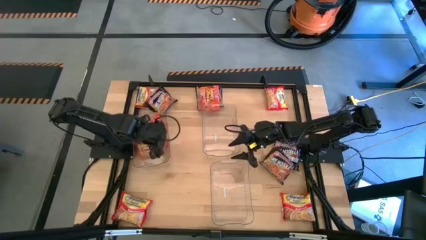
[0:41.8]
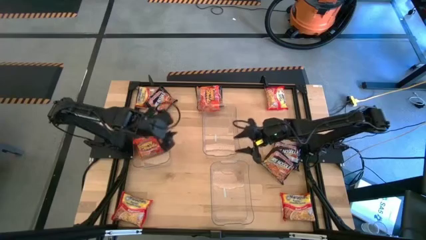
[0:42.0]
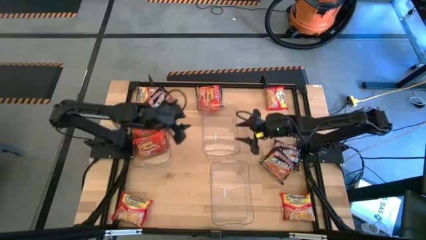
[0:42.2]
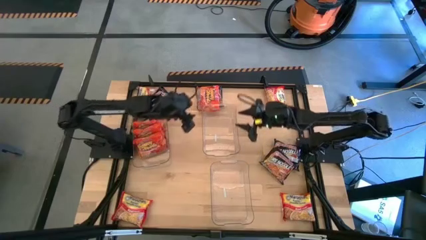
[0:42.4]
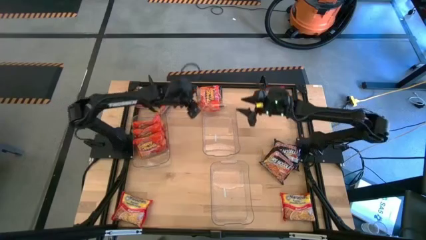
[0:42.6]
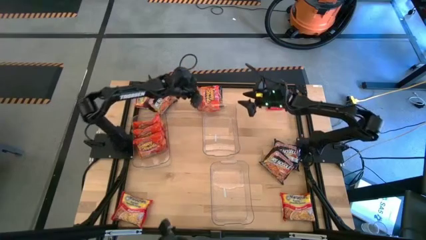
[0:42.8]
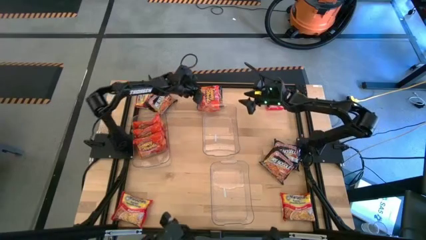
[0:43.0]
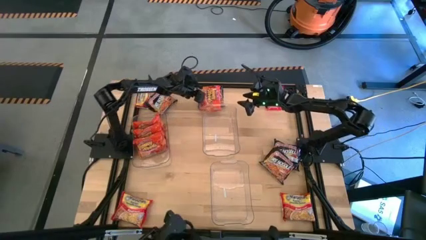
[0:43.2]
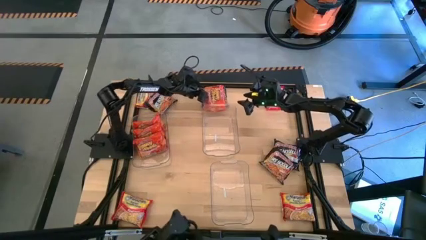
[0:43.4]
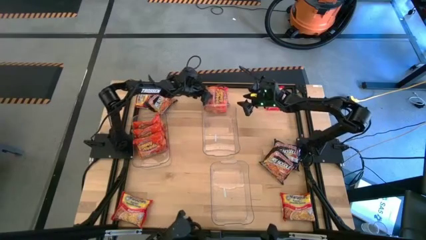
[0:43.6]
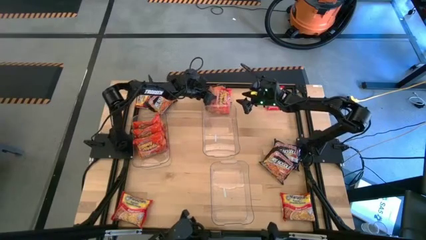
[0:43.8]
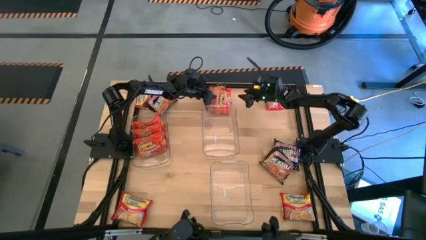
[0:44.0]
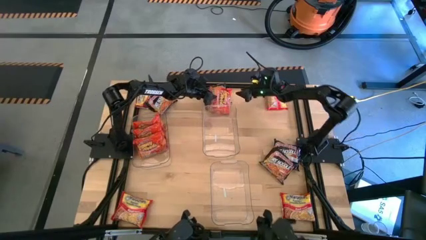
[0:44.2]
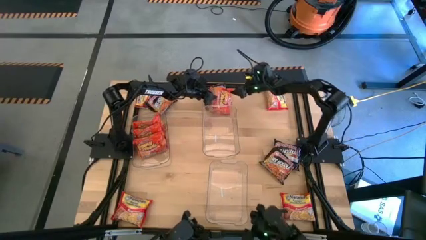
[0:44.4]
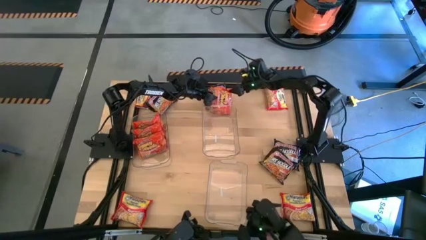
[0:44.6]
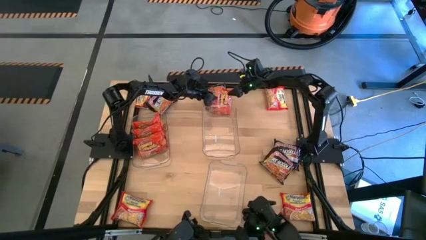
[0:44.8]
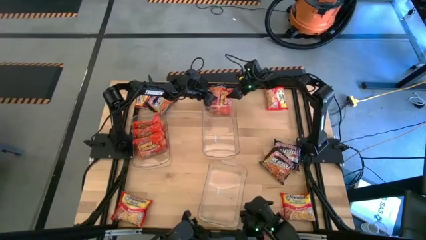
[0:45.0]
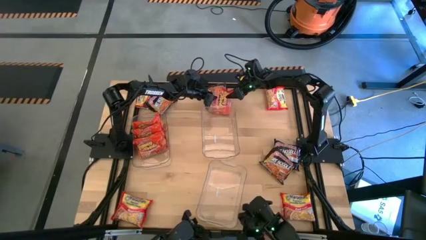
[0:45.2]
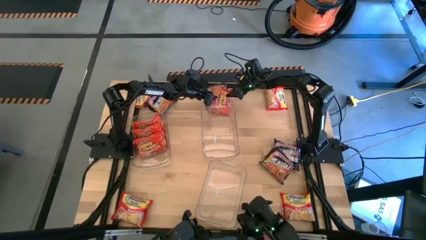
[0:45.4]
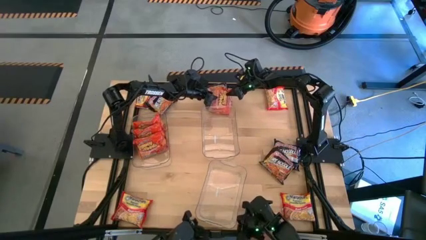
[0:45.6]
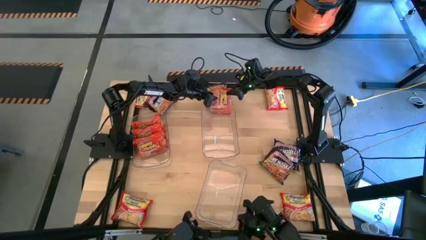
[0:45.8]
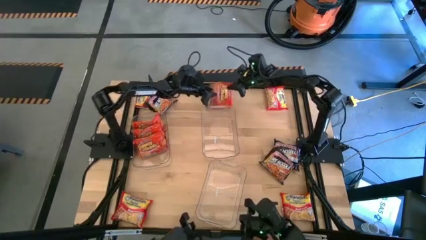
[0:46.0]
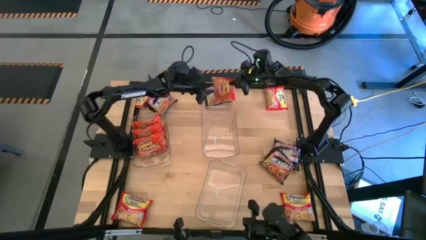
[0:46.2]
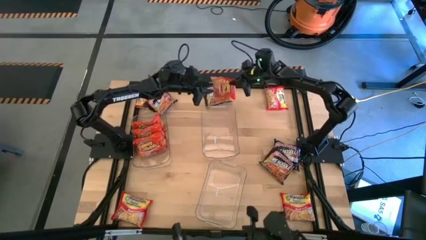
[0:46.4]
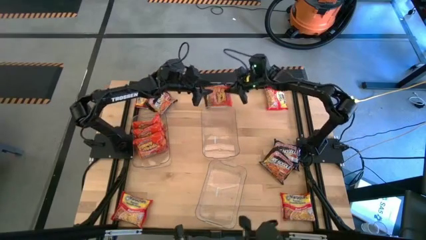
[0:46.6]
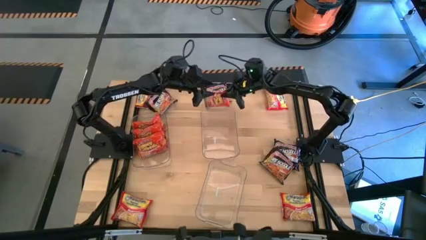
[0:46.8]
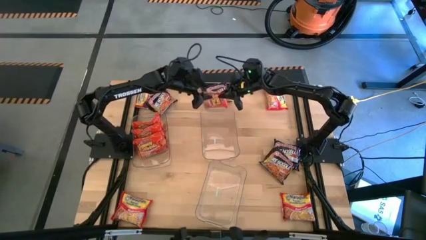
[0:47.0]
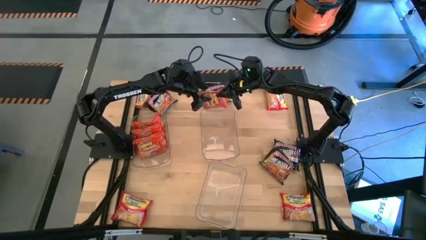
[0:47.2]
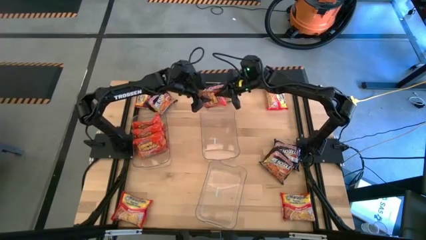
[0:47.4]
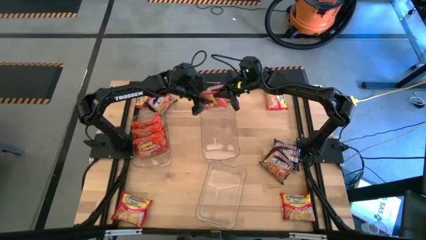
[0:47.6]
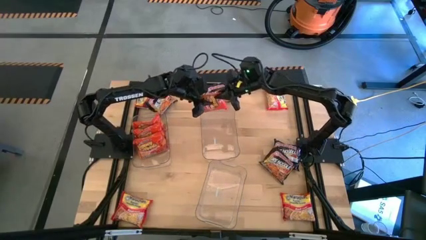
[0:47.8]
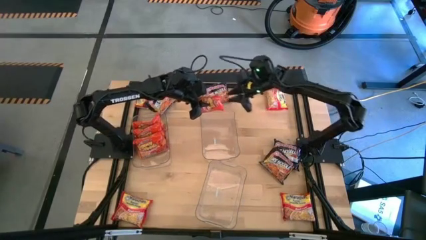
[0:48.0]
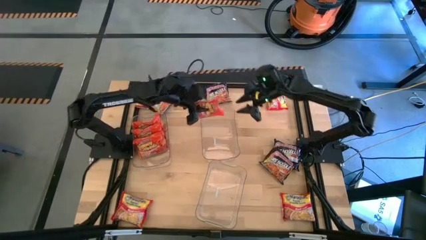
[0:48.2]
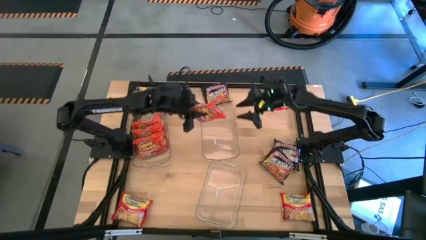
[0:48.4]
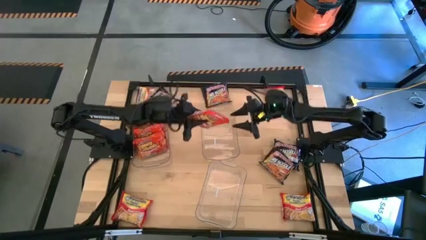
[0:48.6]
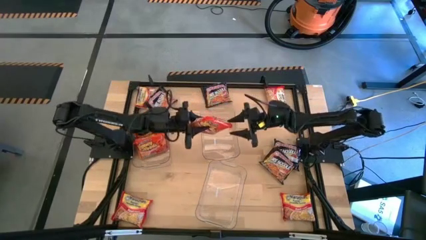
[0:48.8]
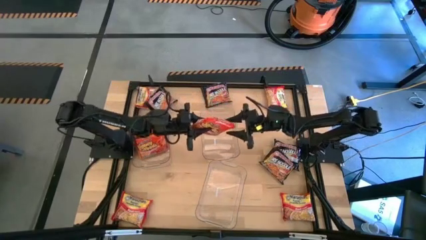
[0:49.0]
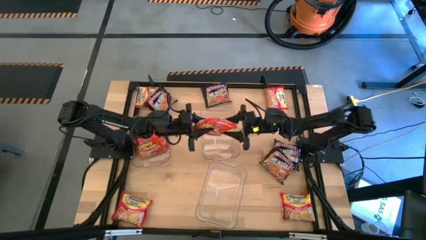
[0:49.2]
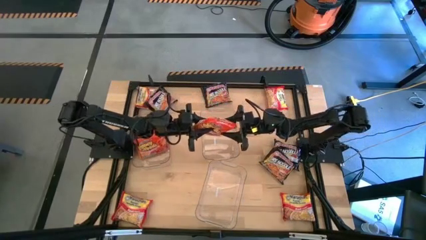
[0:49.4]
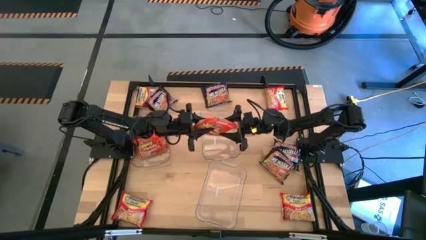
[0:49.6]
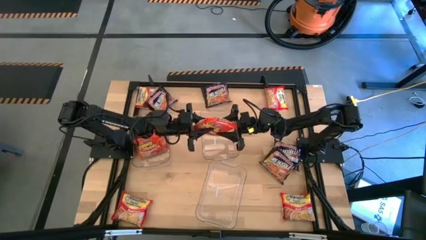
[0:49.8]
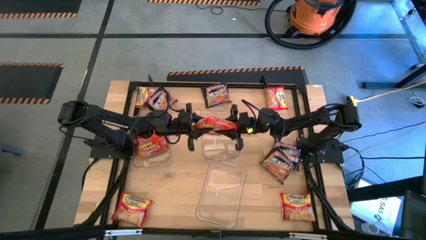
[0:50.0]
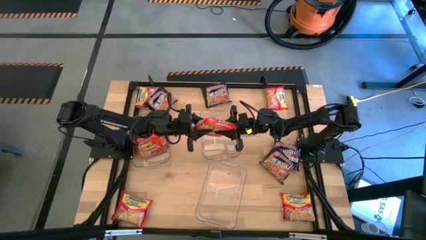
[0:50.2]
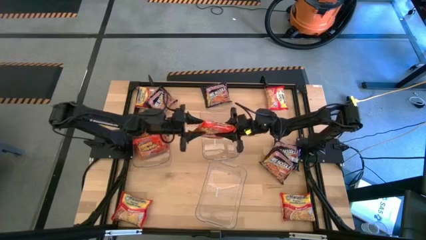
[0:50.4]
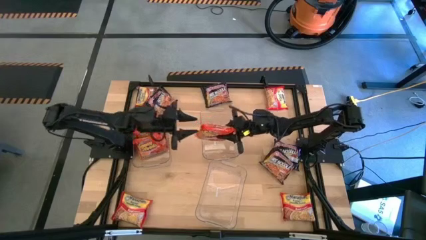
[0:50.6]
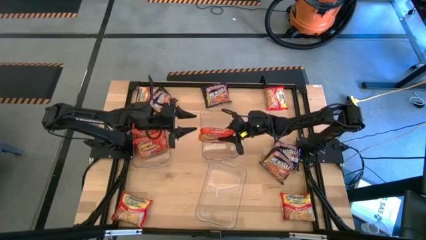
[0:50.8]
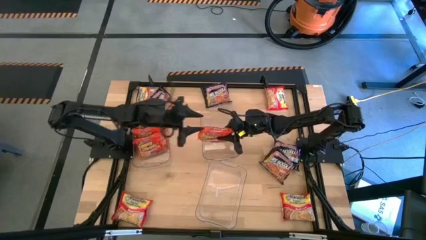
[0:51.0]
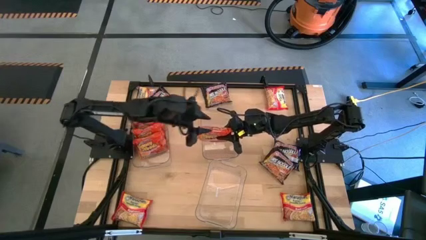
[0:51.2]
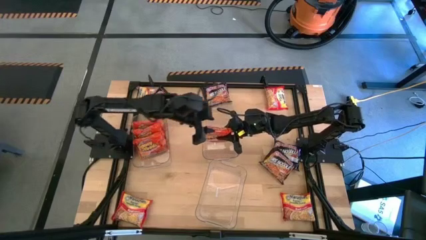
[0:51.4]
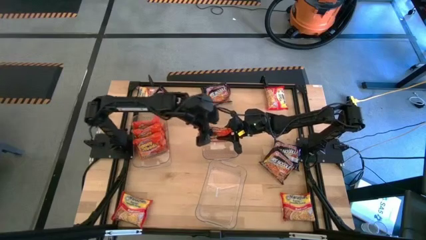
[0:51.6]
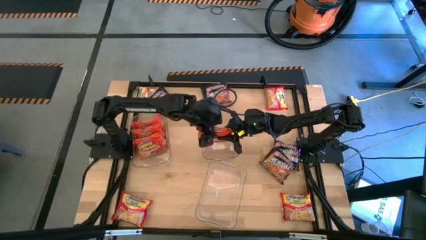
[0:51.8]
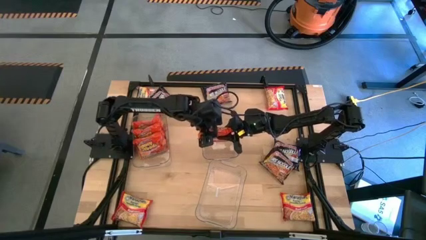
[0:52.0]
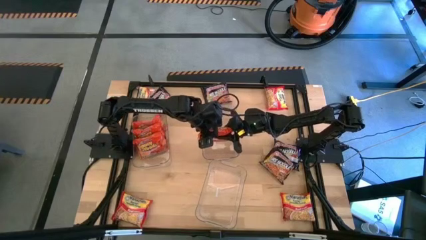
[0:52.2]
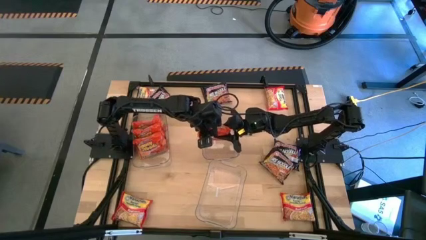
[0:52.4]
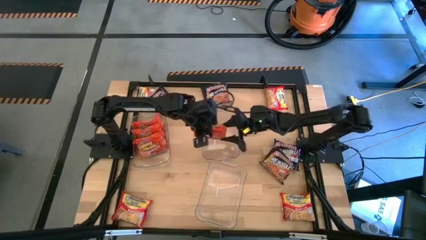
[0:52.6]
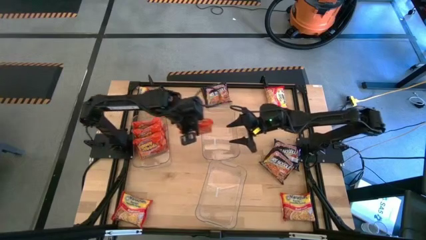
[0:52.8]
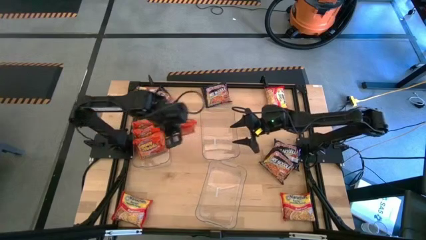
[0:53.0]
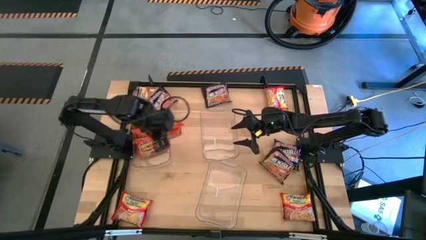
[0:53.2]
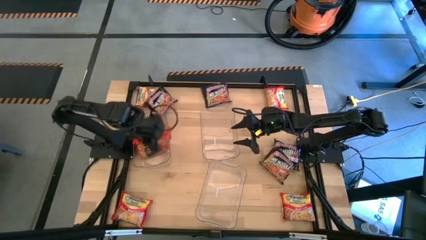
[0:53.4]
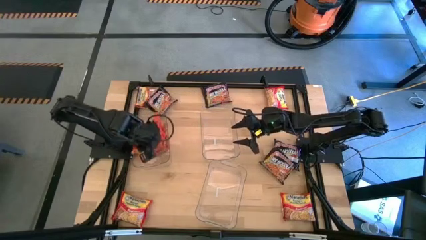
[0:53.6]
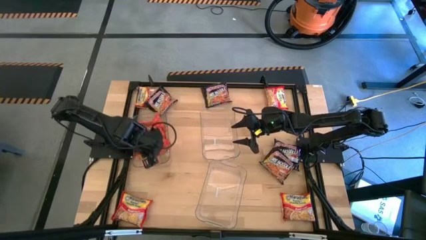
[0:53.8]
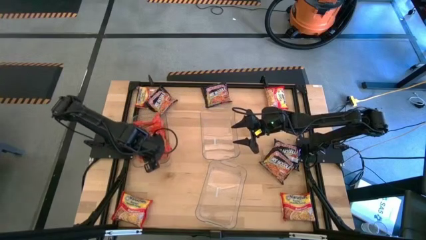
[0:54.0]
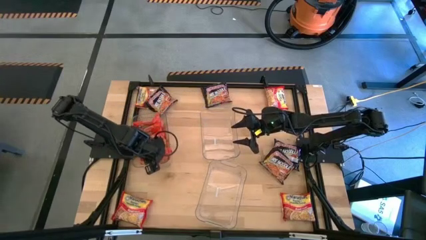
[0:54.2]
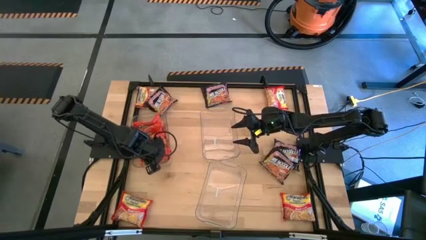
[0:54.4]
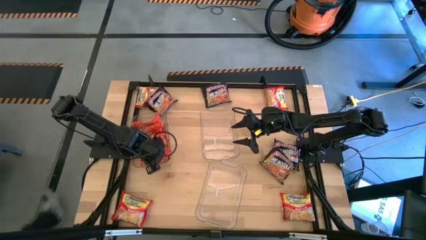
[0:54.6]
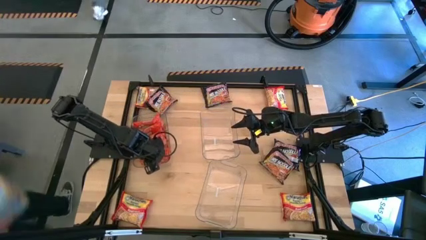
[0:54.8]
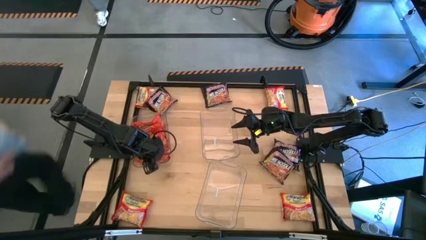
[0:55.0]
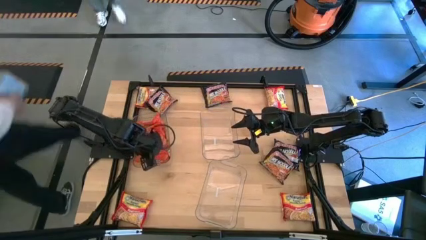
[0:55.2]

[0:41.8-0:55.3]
Task: Sort Maruchan noodles
Put the orange noodle pack into the top left transparent bin

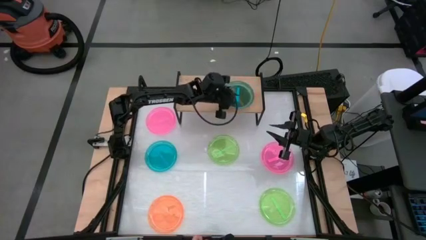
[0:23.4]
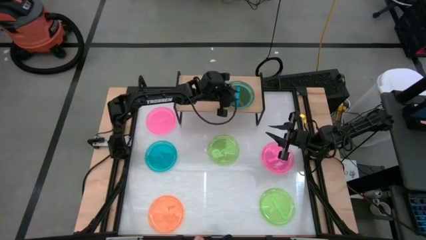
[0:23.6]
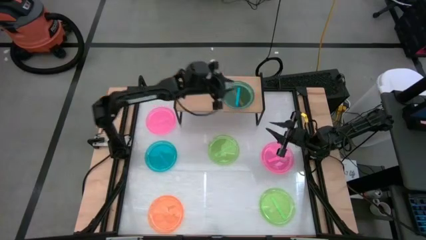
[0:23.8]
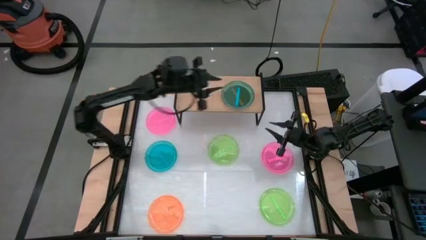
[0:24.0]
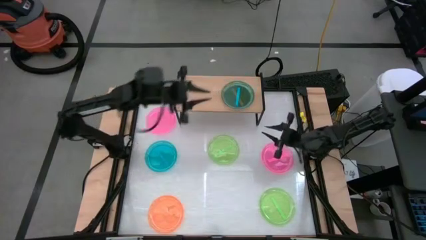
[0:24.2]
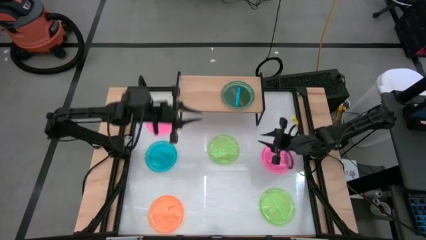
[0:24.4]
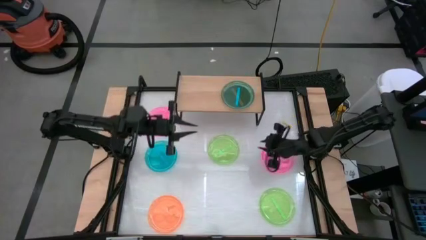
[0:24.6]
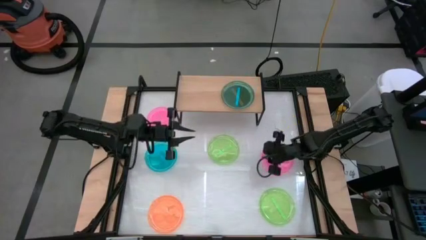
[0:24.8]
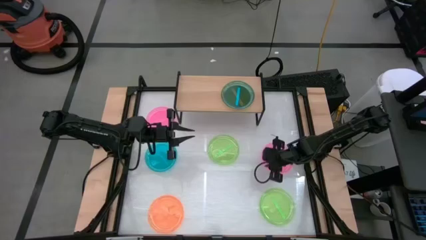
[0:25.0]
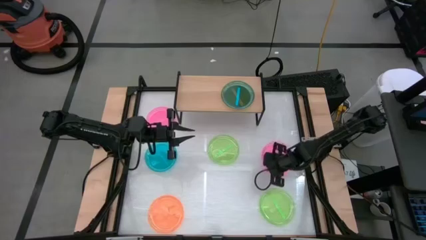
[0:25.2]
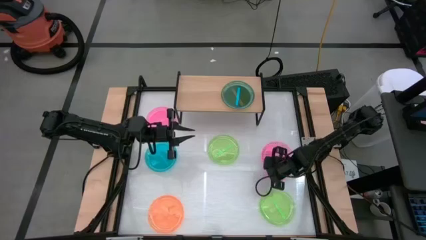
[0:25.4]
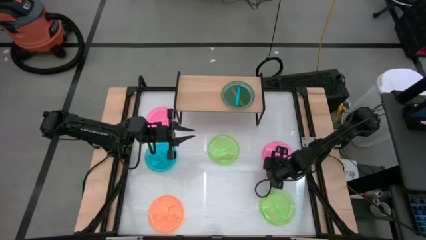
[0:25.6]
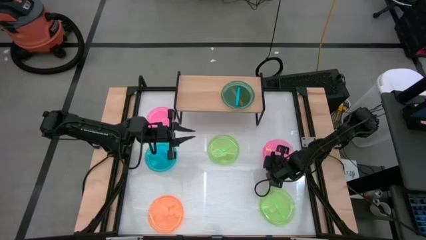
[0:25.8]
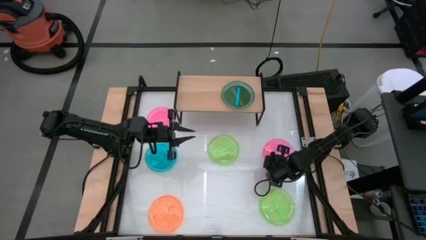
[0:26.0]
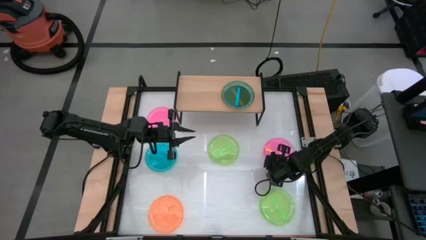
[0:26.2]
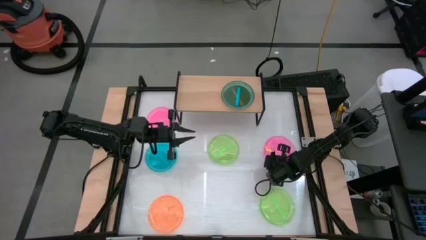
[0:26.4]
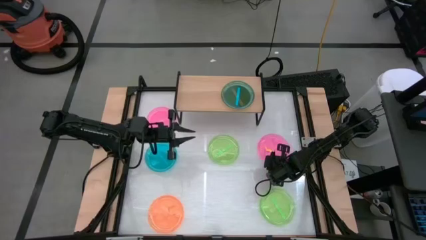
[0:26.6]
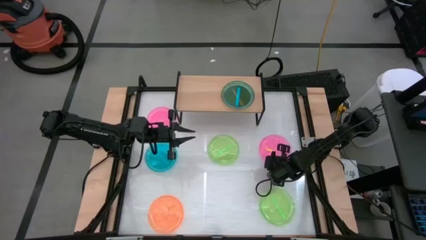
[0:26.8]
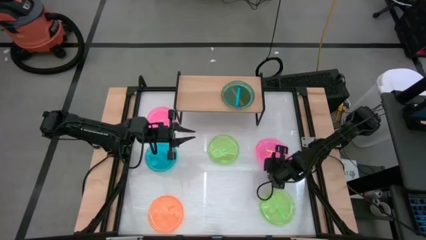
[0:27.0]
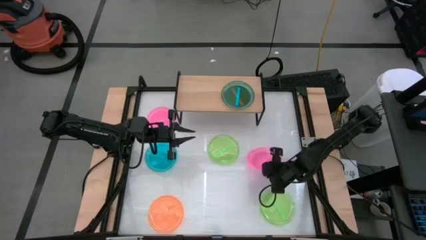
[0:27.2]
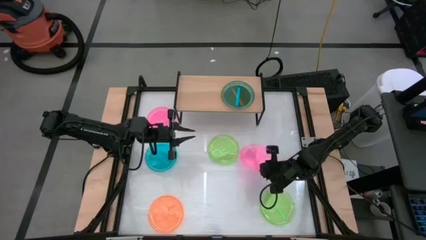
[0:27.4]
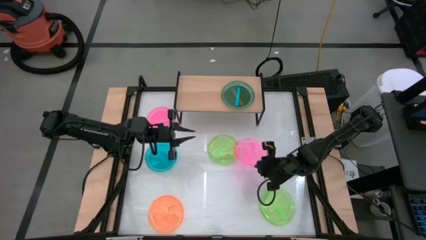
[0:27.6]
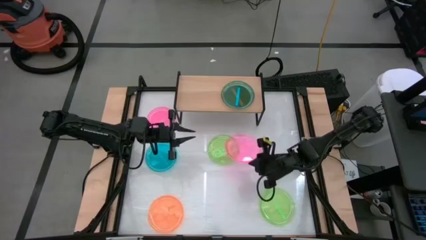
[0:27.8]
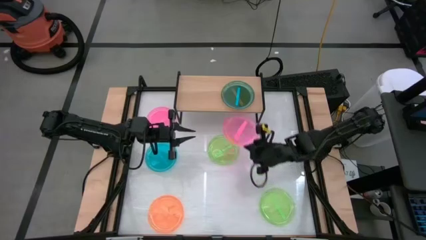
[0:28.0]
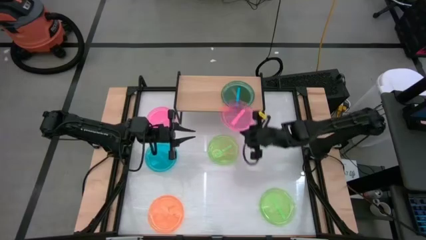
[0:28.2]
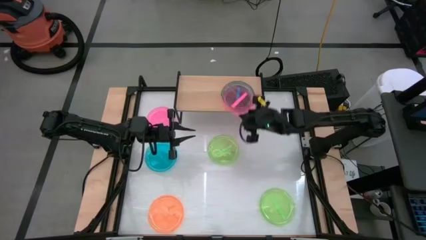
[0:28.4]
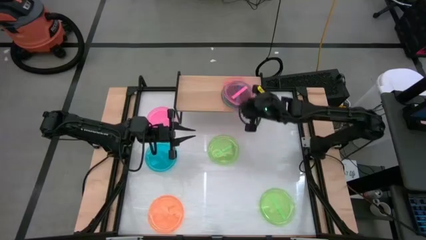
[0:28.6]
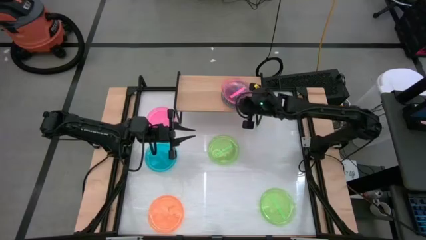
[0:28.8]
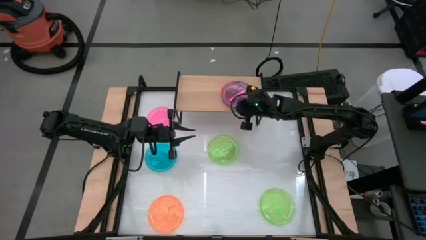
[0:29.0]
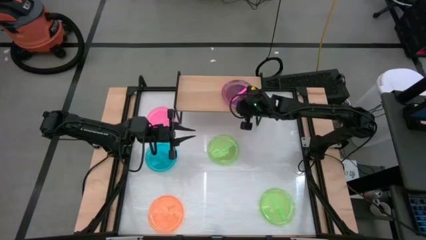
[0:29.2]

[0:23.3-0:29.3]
Task: Place and stack plates onto a shelf
Stack the right pink plate on top of the blue plate on the shelf
